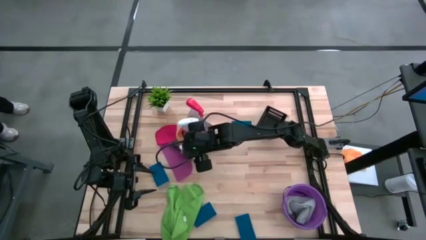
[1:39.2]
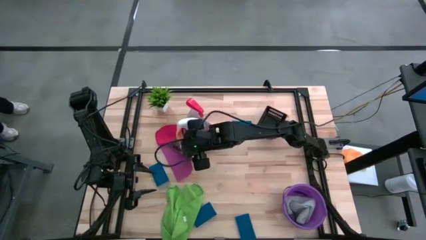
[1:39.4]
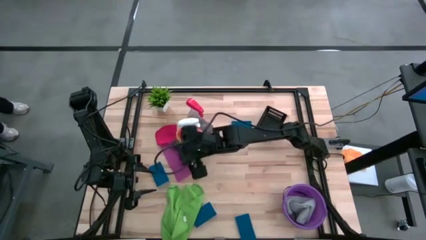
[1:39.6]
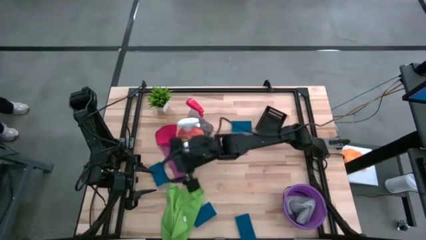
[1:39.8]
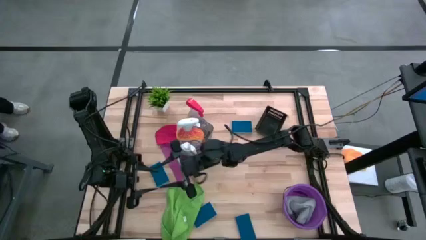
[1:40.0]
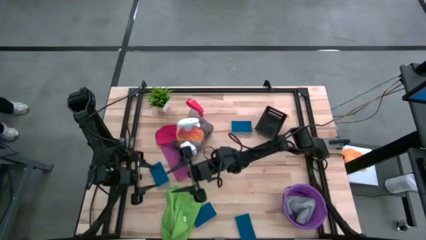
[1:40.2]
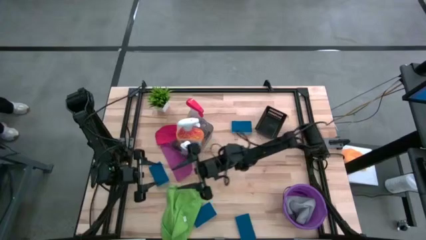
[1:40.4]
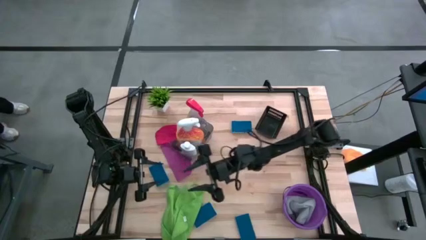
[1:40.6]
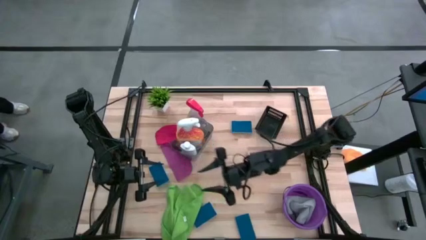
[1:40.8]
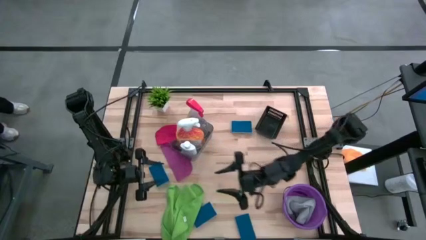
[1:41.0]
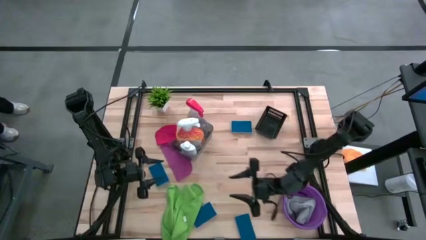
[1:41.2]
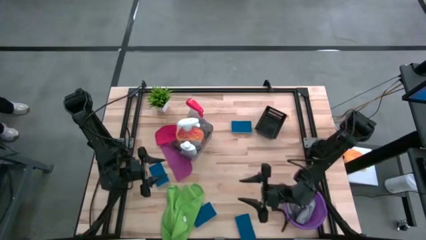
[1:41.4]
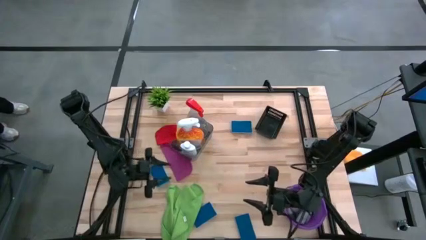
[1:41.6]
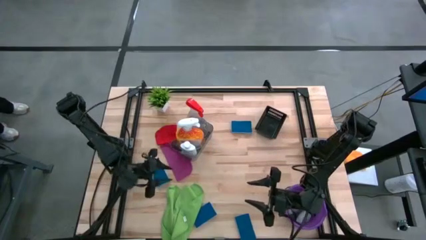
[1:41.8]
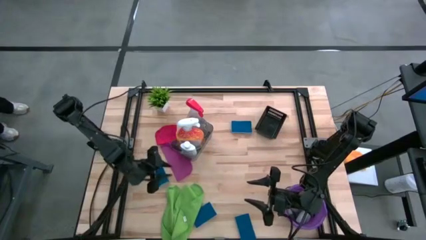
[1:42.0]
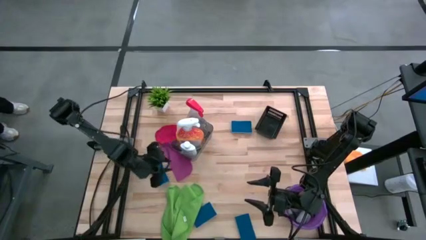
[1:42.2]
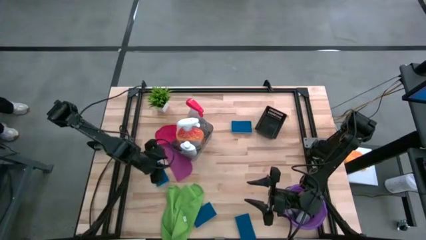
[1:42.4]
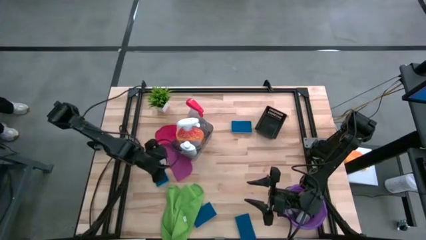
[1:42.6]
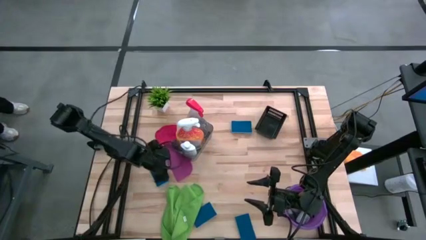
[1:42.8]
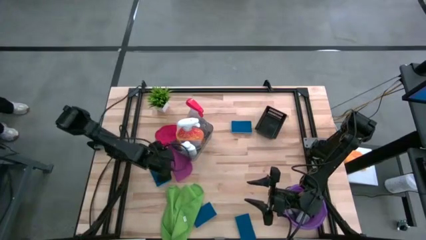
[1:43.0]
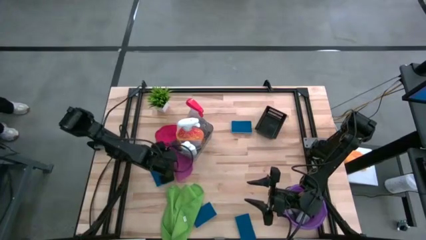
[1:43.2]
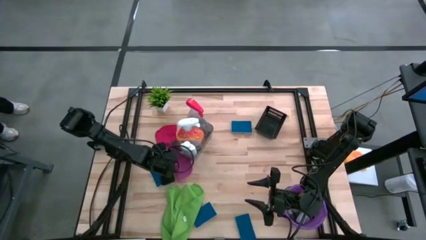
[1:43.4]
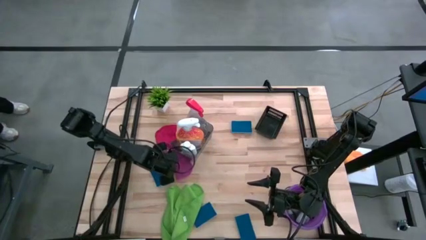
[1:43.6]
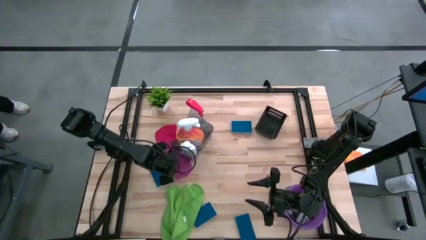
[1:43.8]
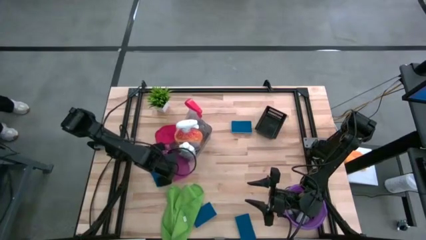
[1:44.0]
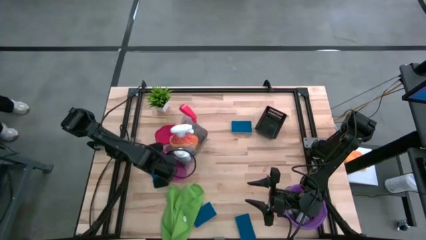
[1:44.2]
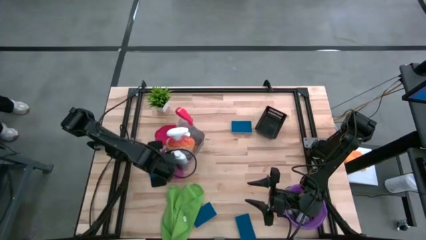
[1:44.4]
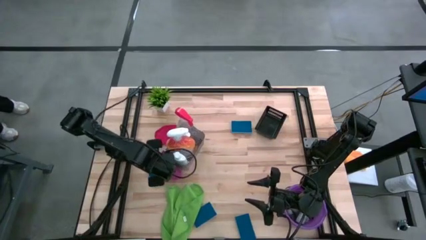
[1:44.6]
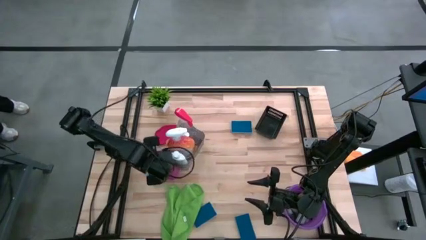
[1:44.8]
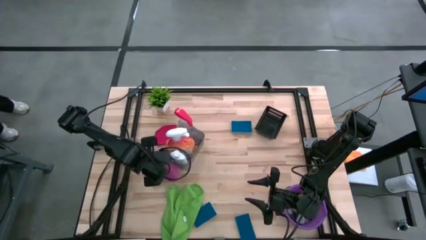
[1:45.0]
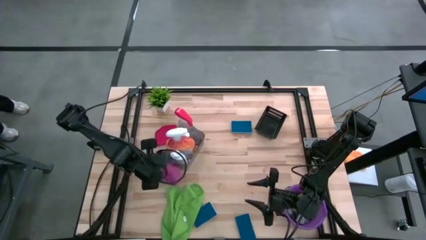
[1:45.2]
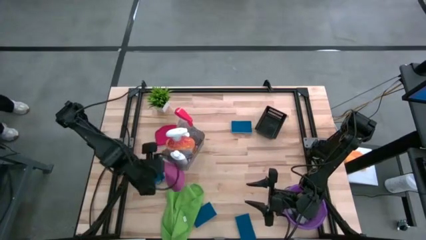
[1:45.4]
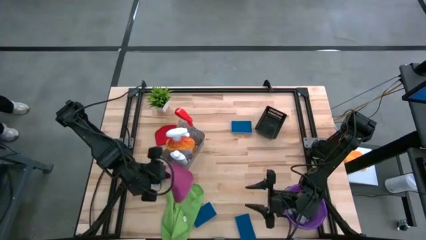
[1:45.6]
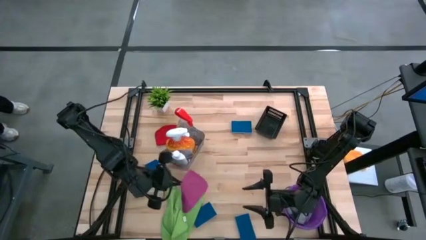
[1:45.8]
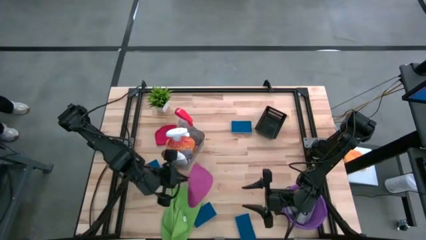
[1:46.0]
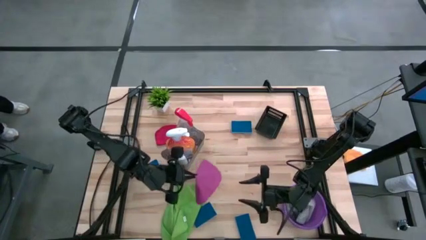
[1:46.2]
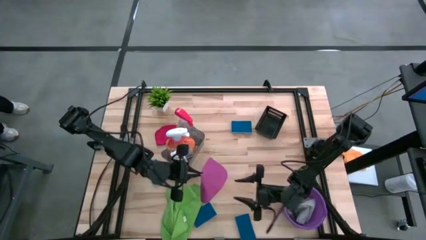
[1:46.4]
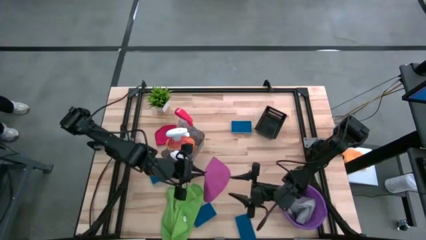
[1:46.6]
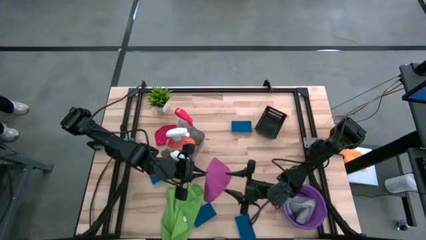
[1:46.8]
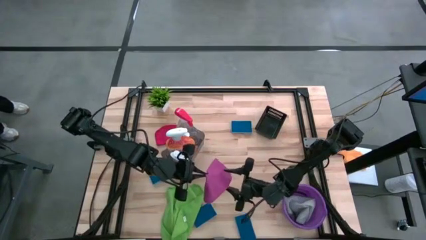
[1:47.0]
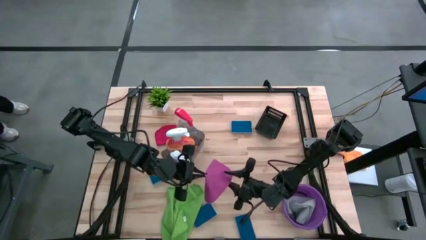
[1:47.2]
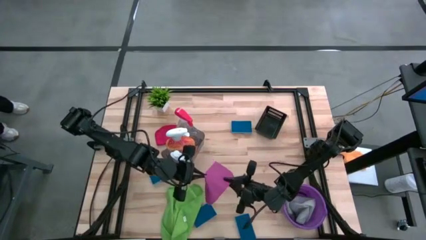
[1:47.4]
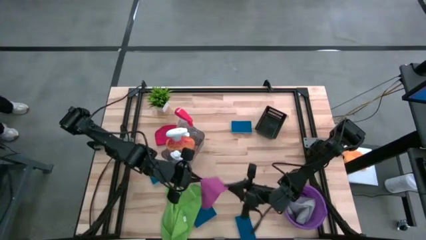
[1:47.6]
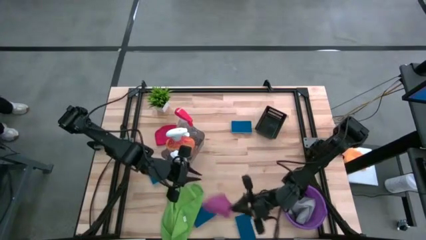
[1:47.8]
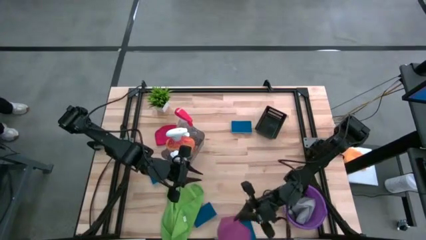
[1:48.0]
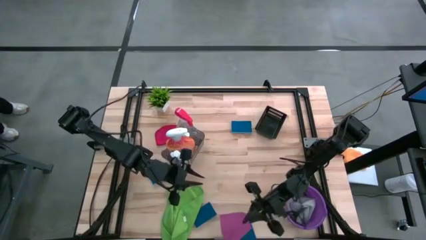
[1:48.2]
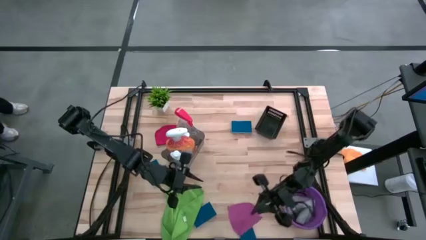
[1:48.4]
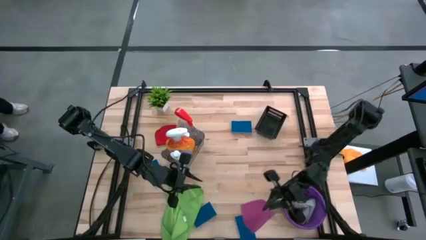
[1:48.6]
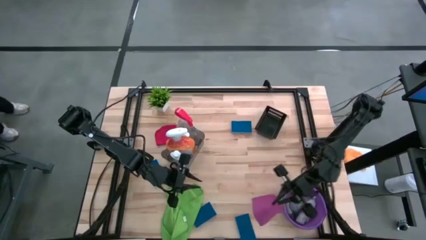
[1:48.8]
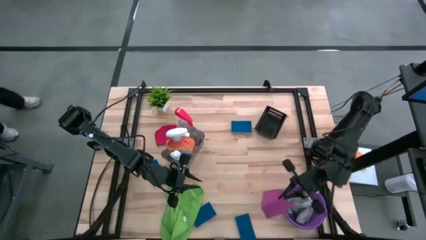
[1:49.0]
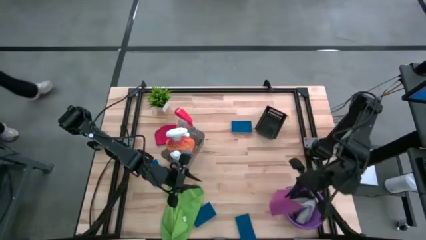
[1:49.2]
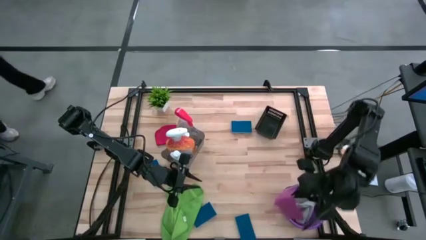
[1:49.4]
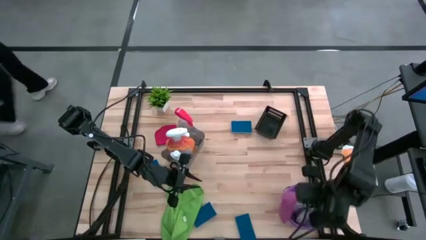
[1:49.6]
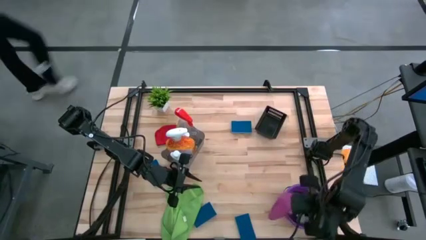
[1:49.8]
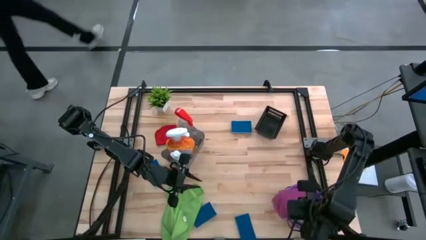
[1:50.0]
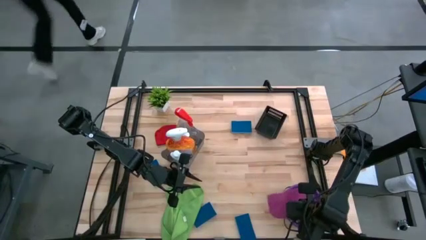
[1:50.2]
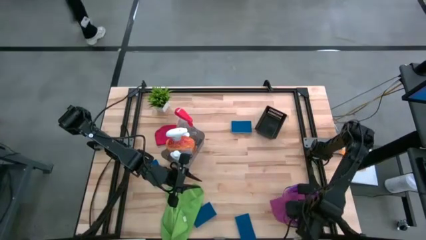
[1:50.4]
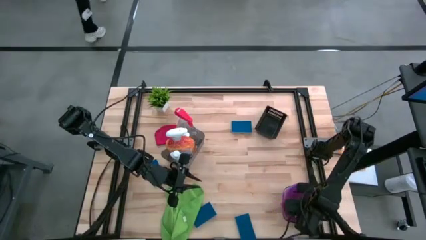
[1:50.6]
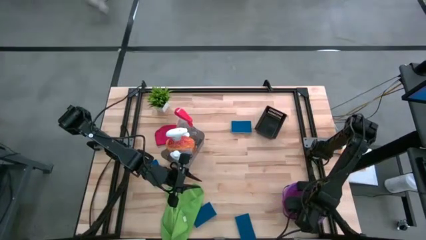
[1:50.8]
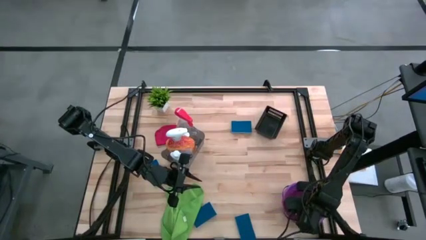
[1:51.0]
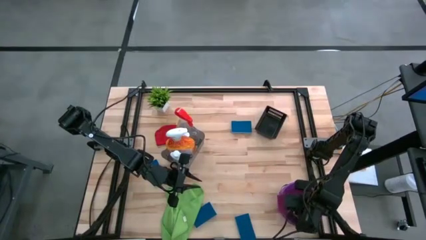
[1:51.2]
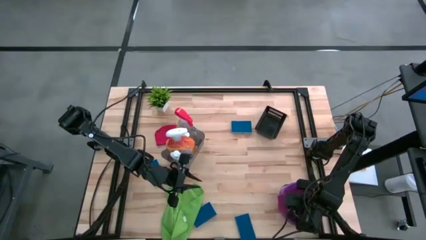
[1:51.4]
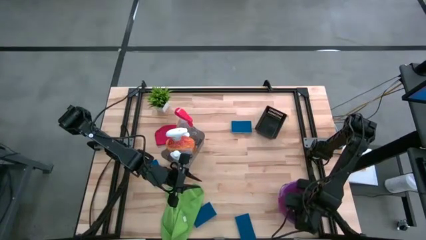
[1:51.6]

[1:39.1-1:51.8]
Task: Pick & Place Kitchen Items
Put the dark pink microfiber cloth into the purple bucket

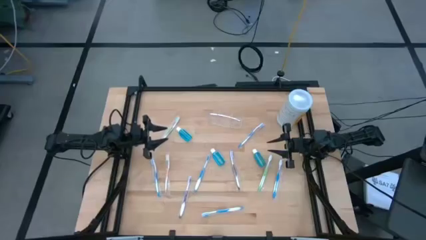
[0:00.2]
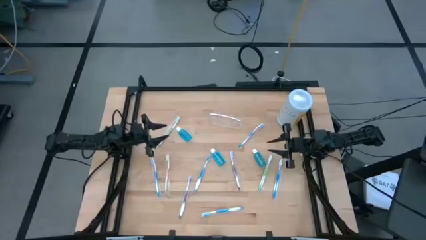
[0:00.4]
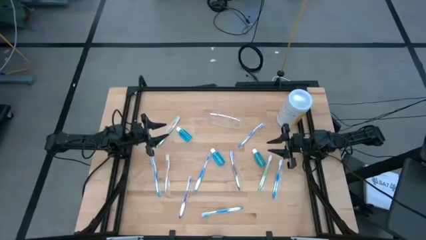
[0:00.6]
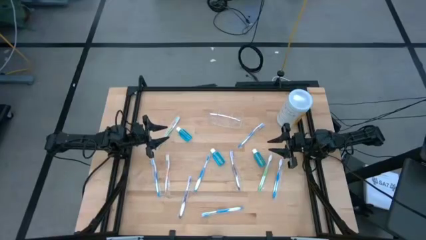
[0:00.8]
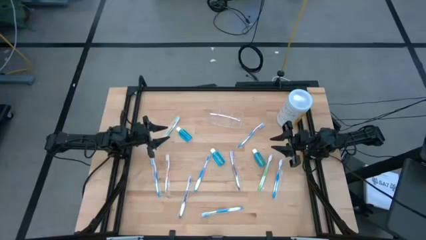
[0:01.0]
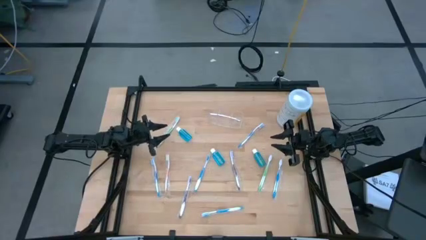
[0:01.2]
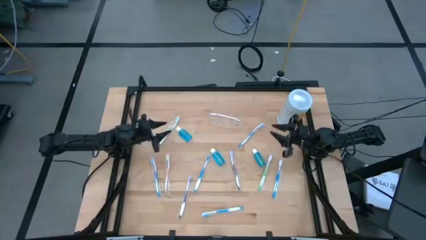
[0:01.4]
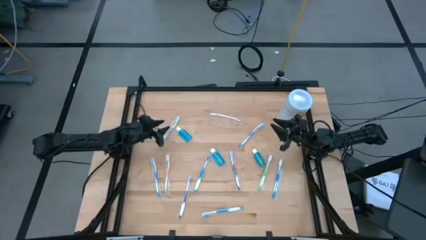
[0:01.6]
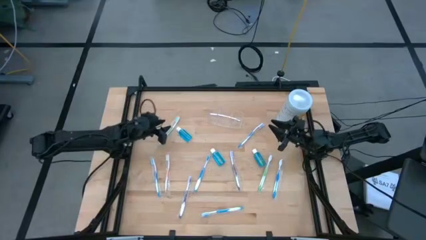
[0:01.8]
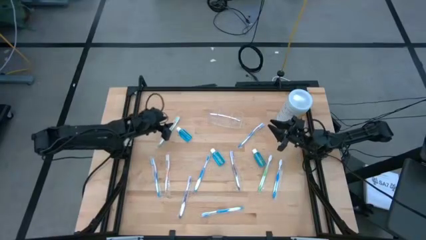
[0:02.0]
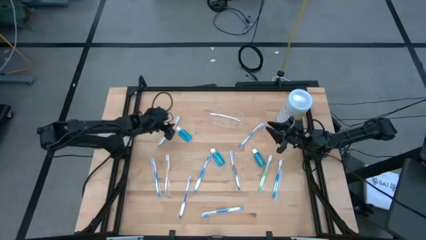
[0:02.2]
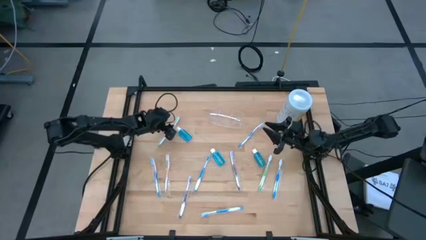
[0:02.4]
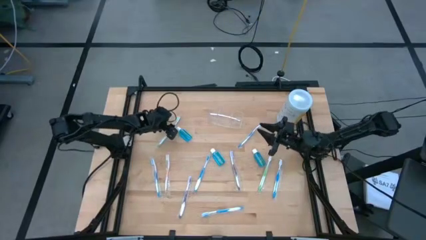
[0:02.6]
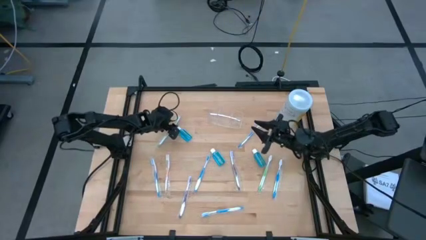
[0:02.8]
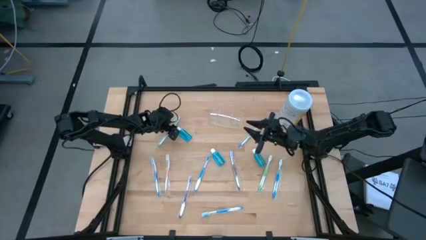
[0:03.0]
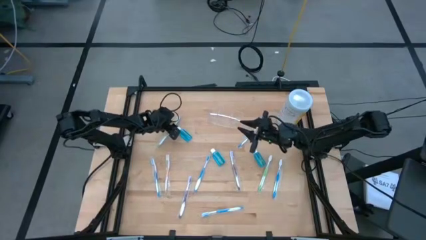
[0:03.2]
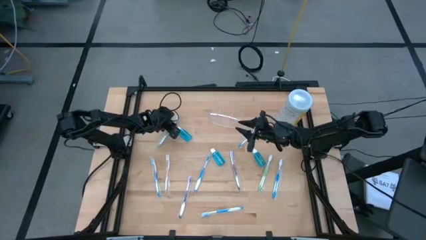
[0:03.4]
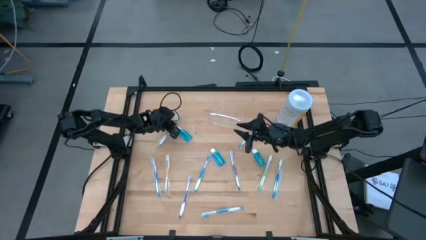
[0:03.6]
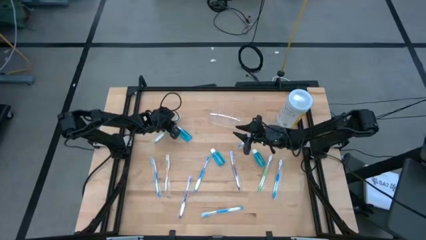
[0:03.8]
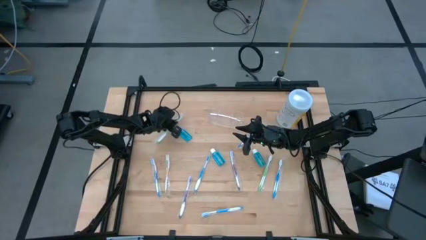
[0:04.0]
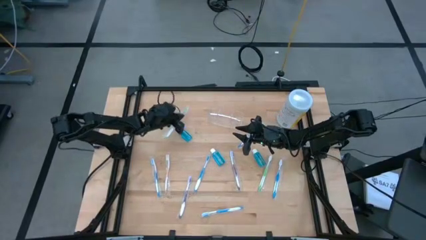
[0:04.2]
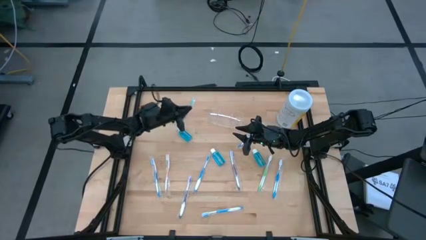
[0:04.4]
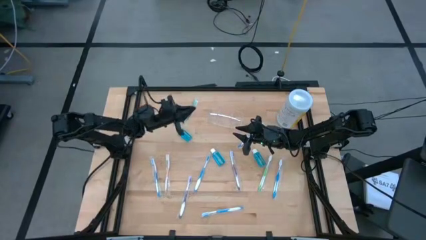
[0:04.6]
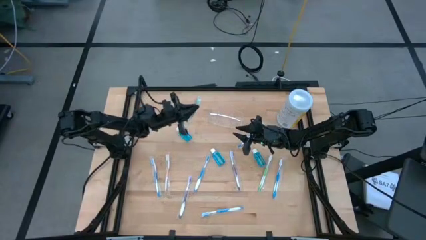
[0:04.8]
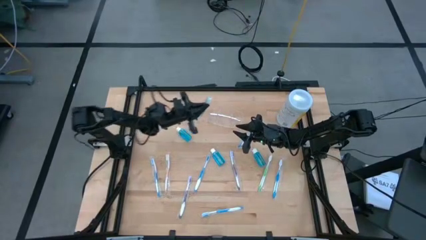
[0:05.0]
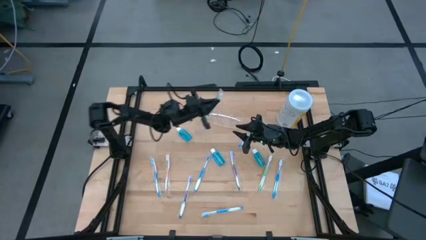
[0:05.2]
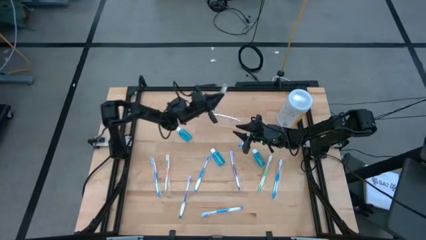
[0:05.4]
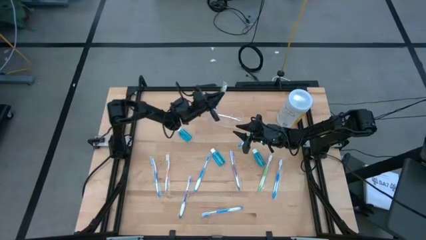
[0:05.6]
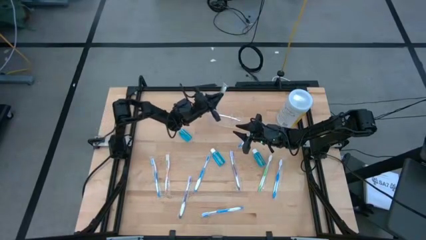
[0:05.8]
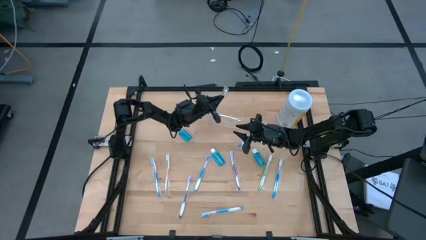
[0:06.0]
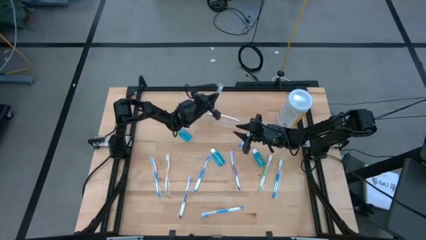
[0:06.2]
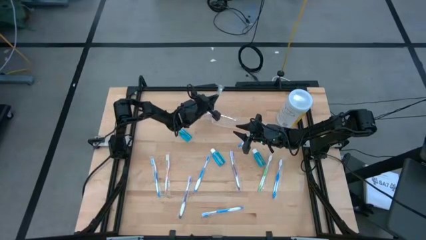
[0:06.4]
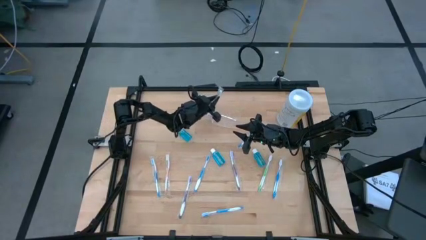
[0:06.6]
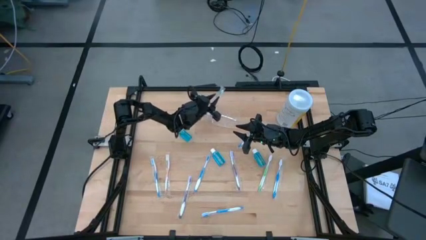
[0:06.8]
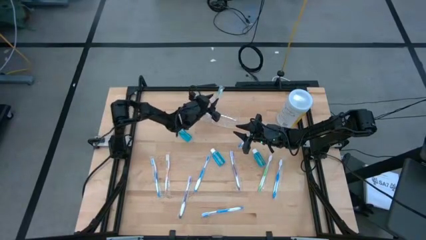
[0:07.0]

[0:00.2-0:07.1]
Task: Pick & Place toothbrushing station
Put the left green toothbrush into the left section of the transparent organizer
